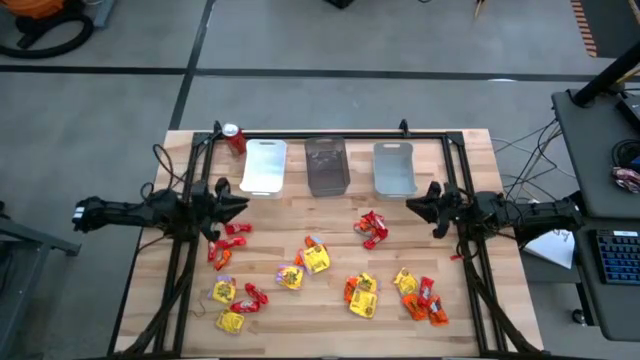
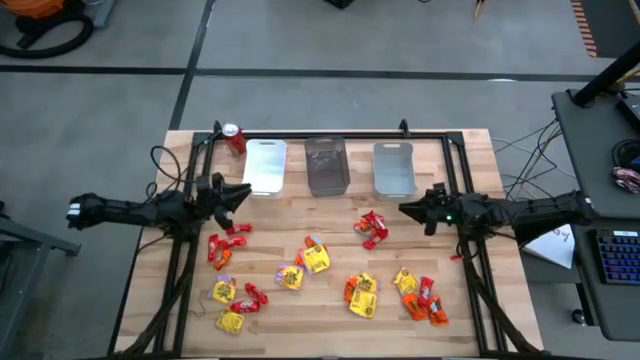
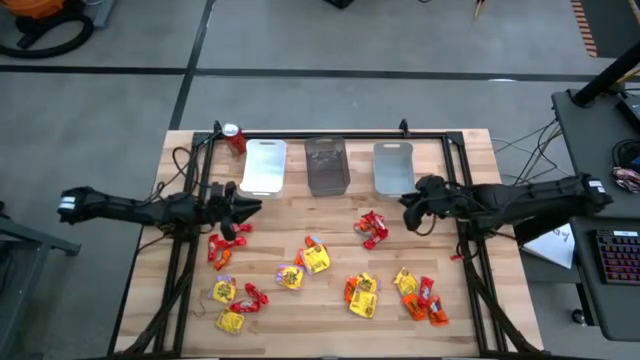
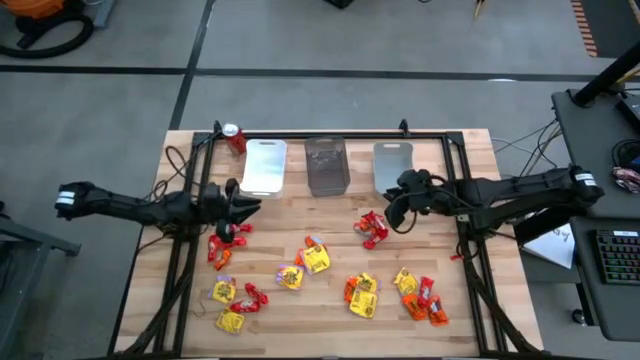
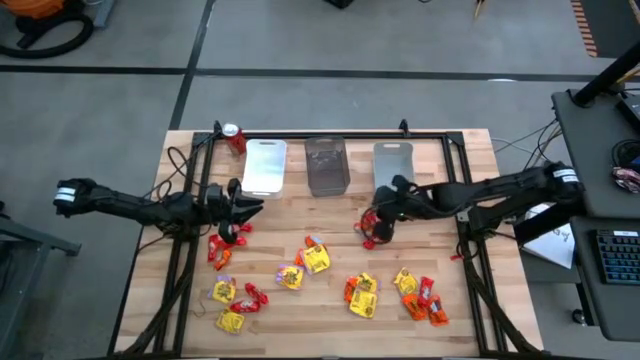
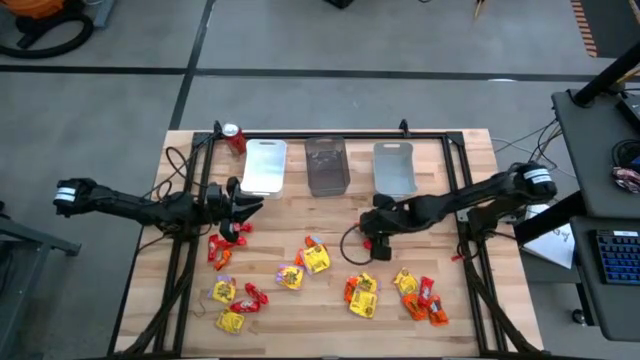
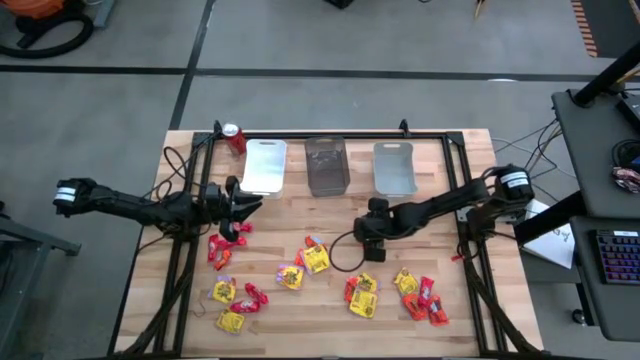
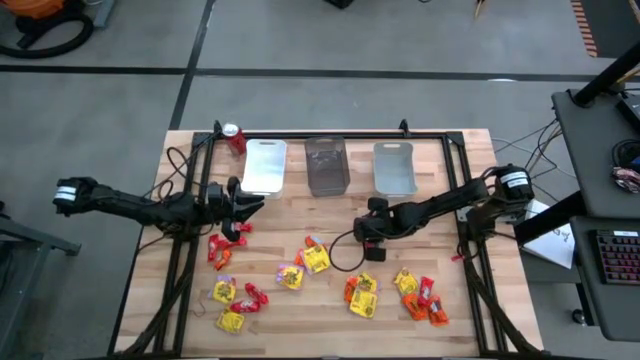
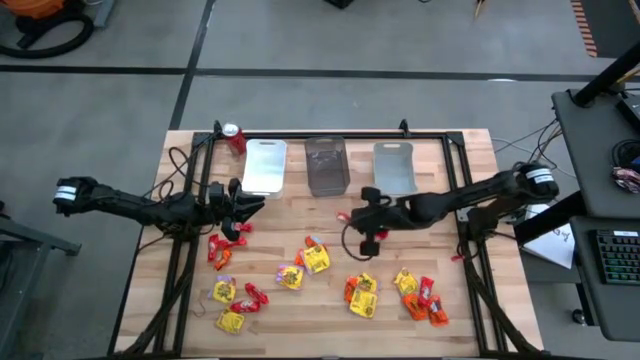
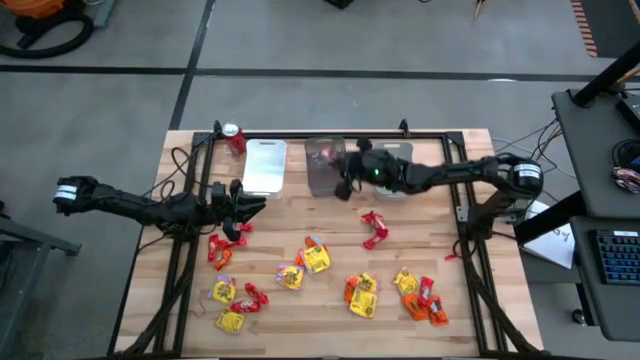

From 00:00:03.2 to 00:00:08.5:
Task: Sort candy
Put the orange chocolate into the black bin

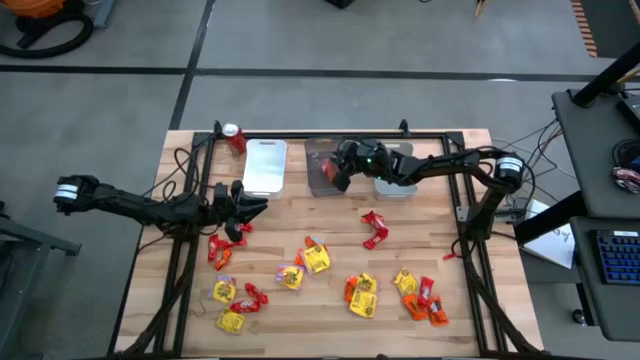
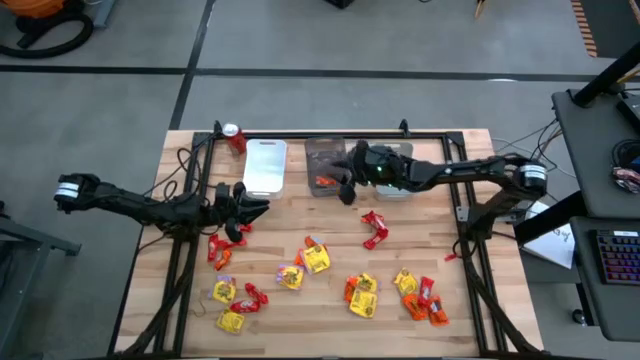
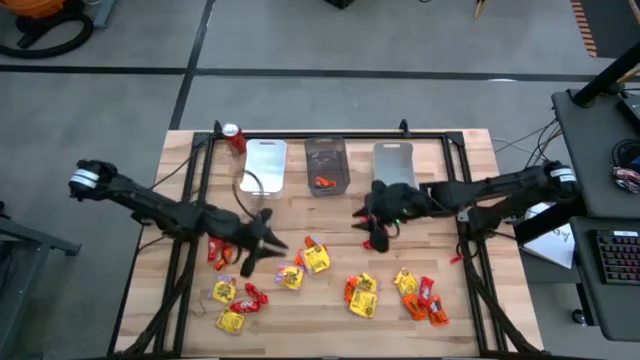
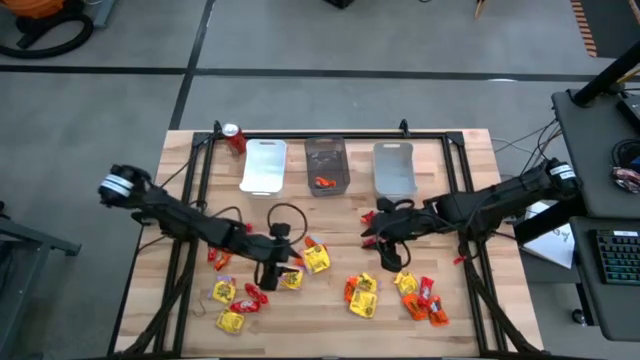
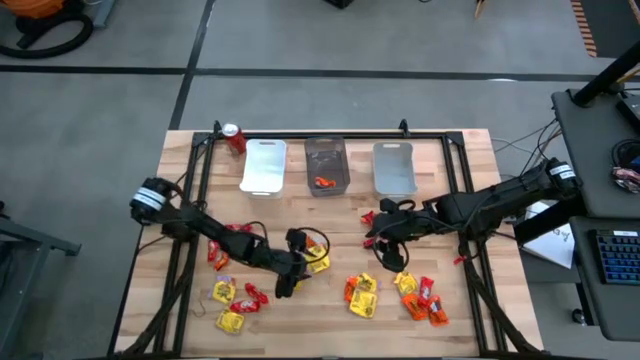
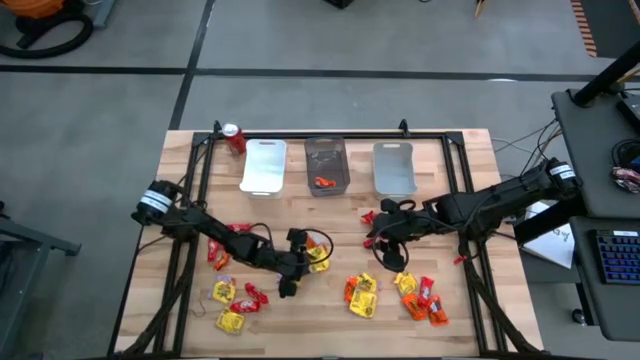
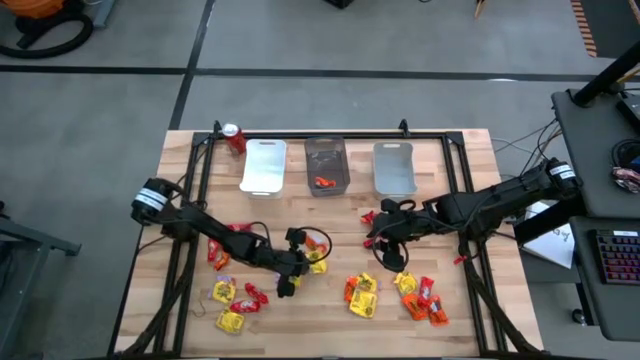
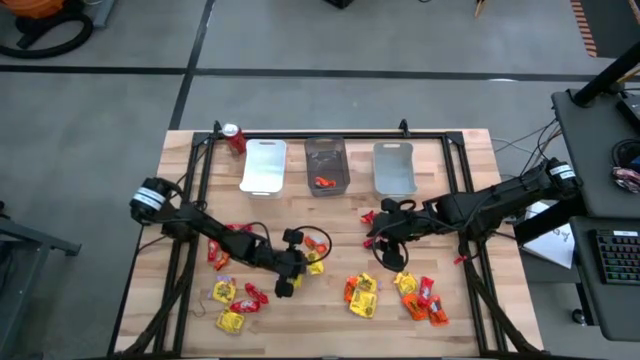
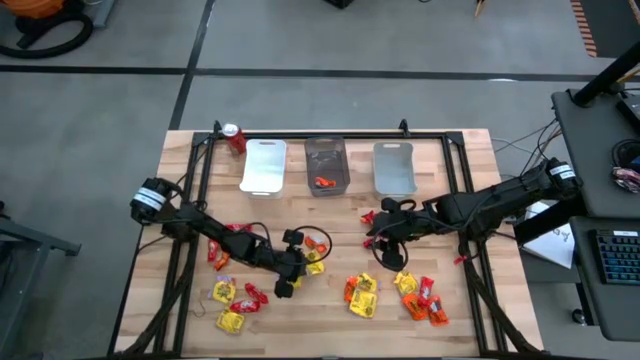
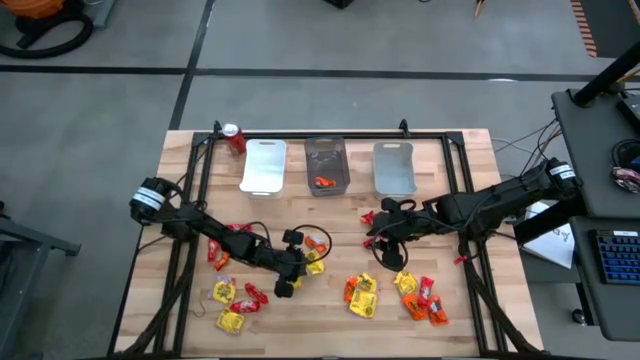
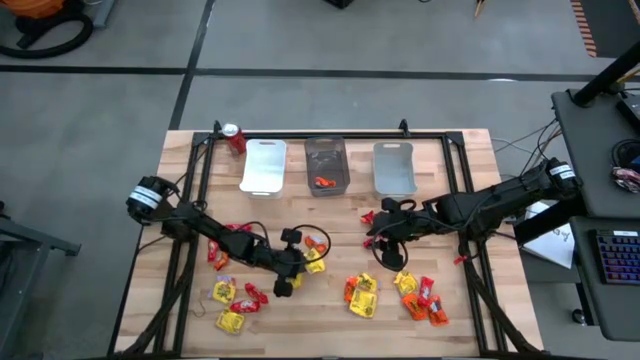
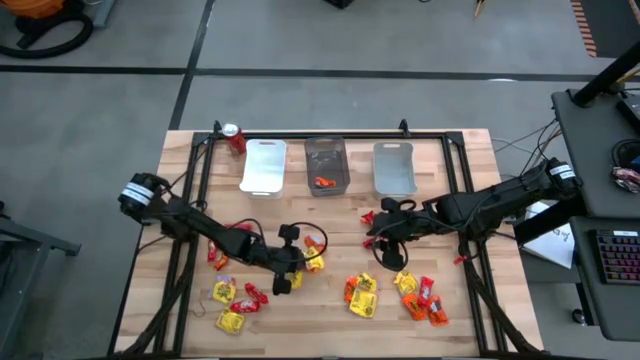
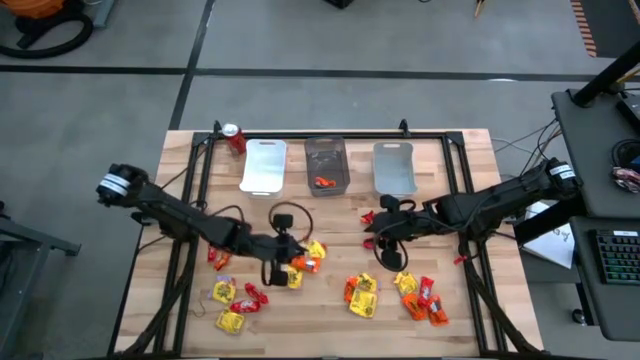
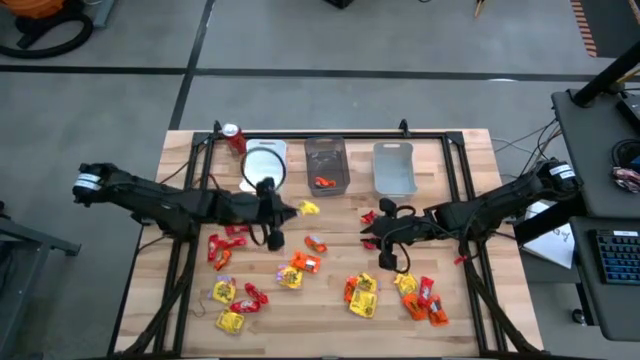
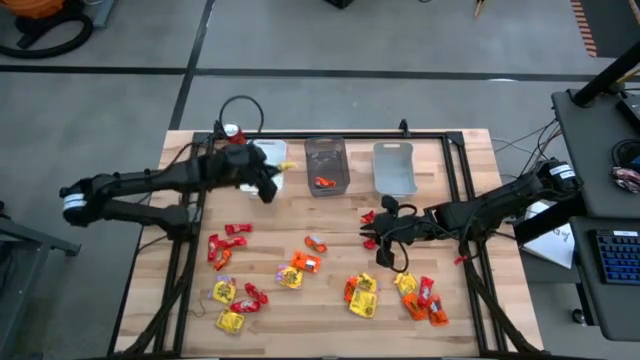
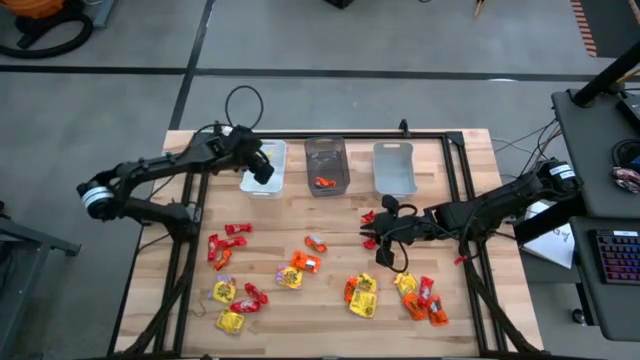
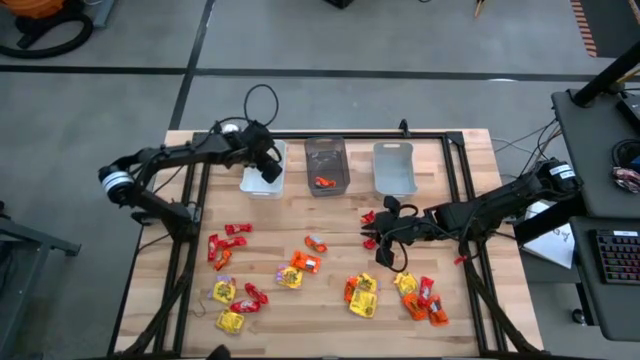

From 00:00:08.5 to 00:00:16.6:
Put the yellow candy into the white bin

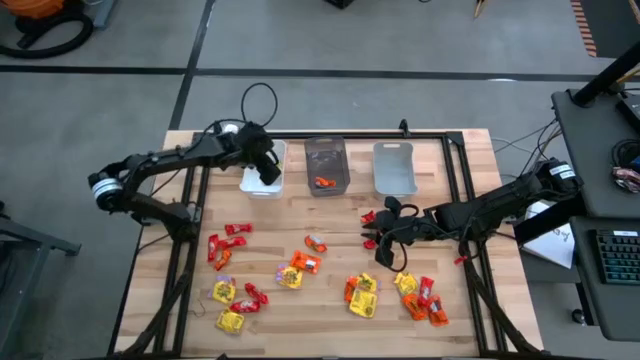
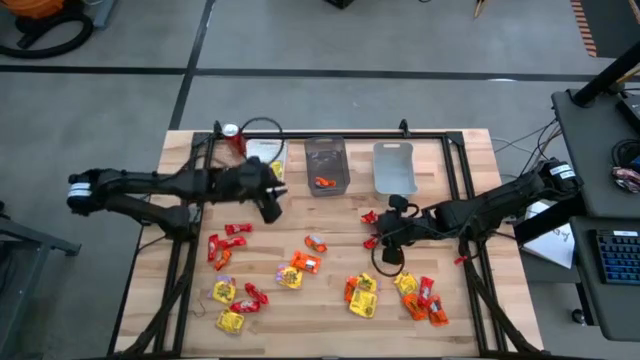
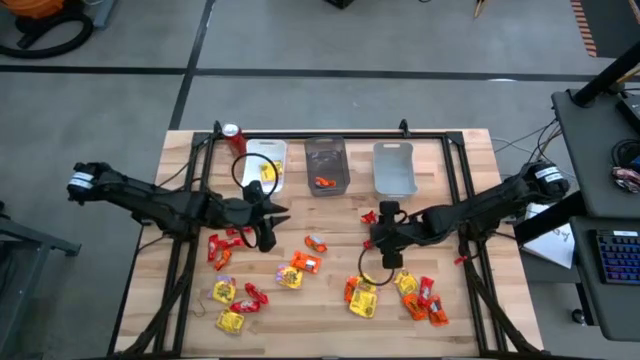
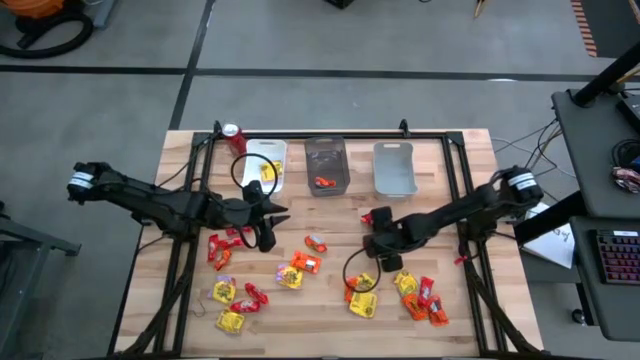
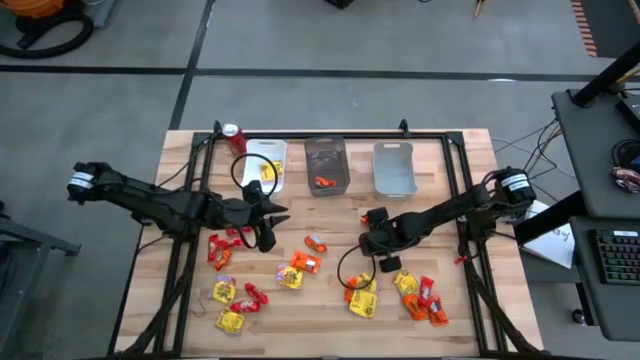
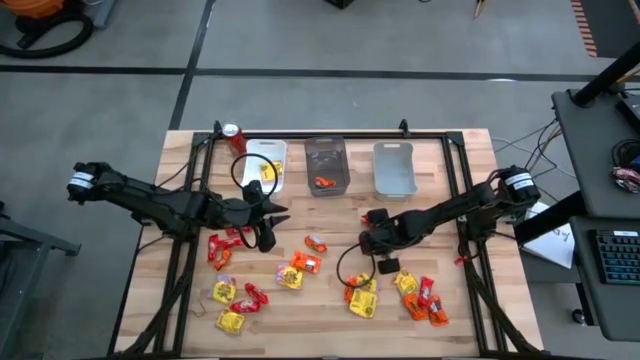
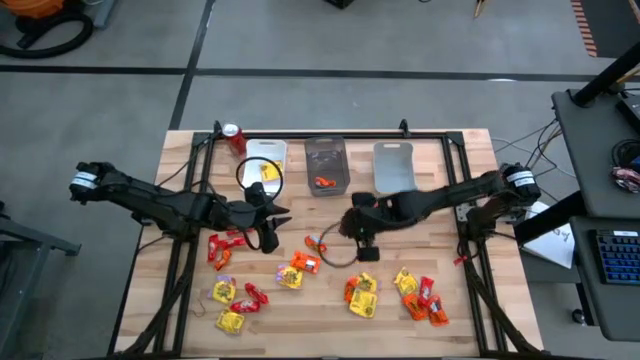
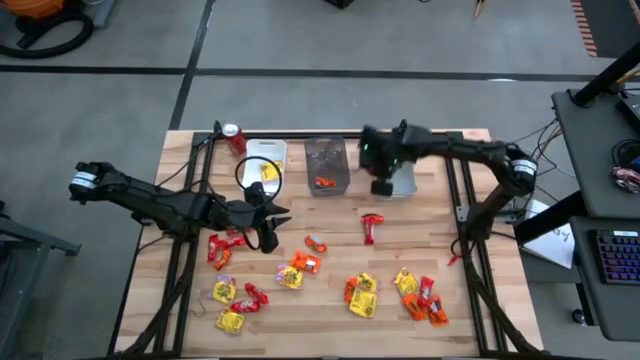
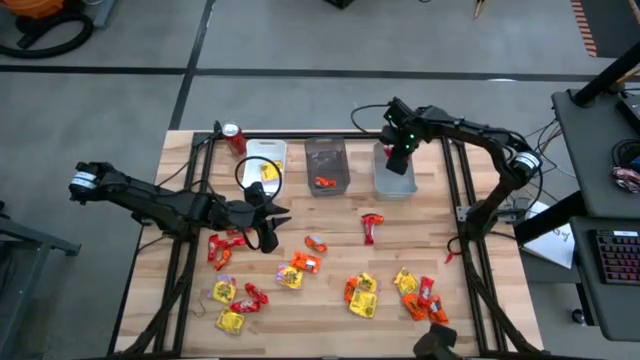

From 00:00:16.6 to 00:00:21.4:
Put the red chocolate into the gray bin

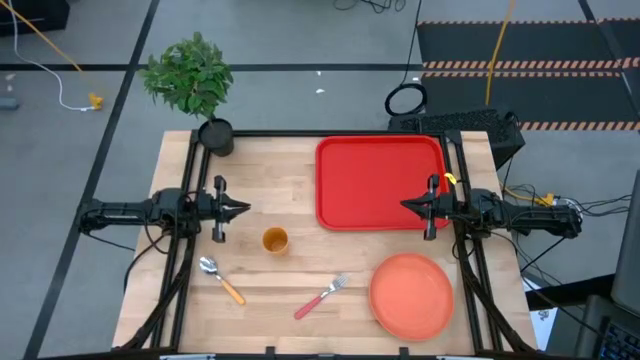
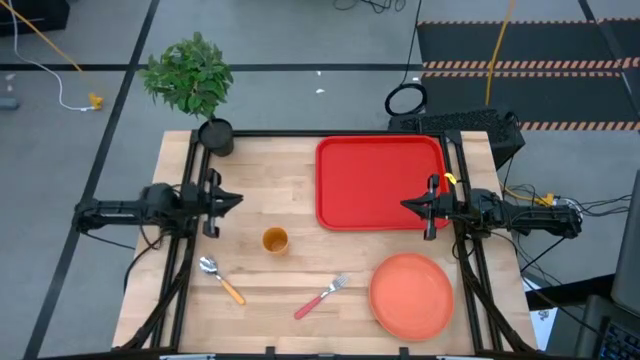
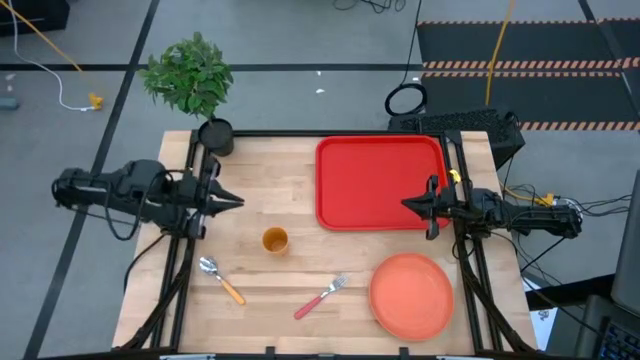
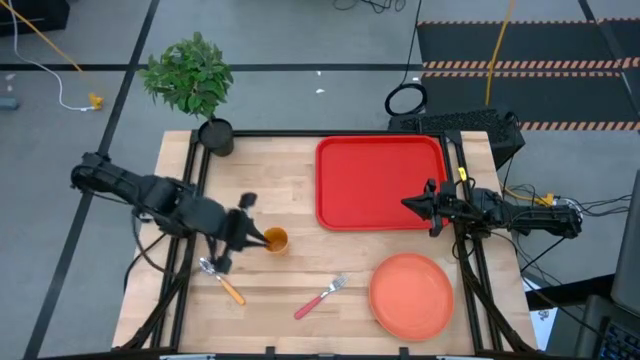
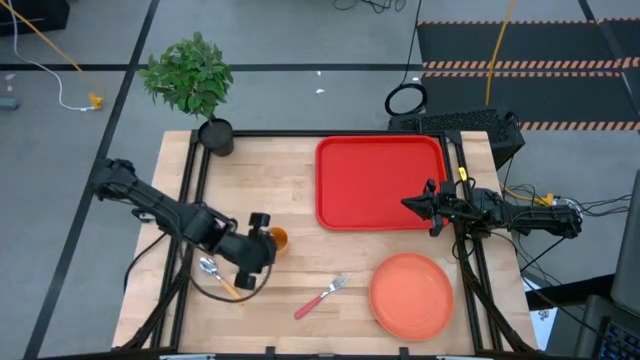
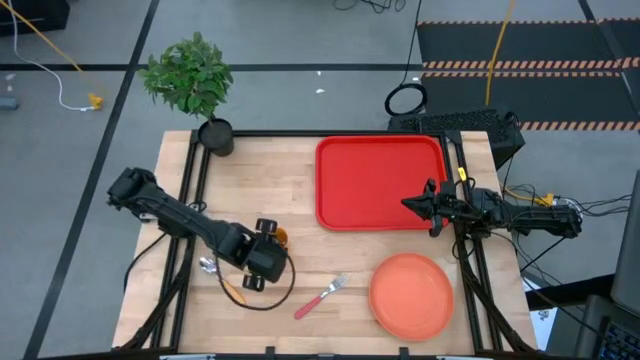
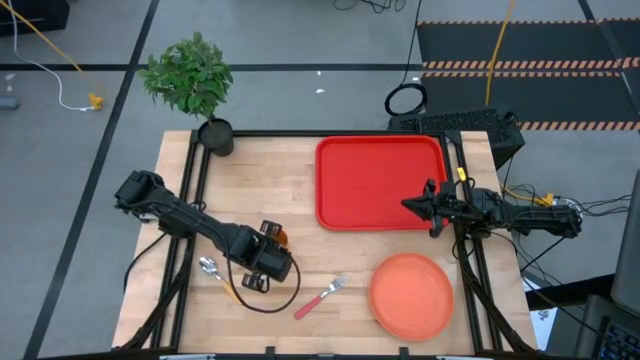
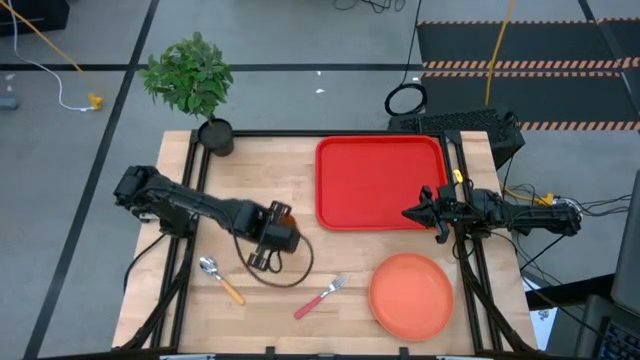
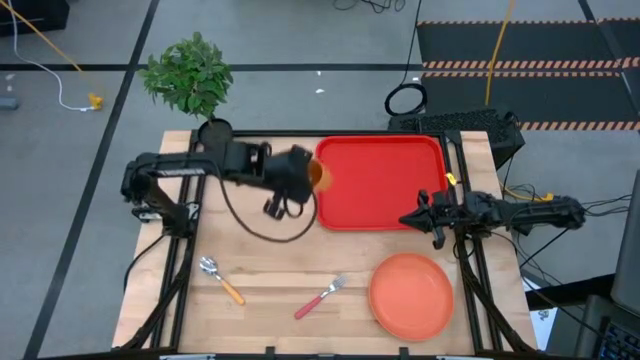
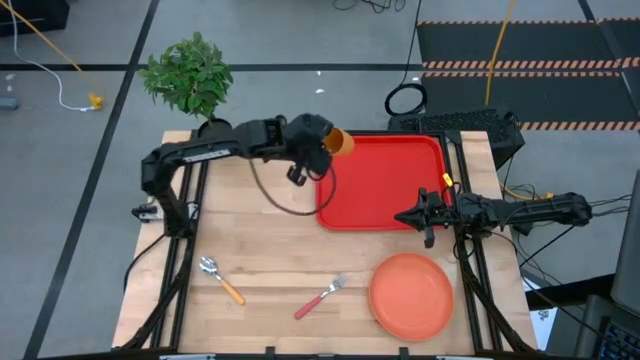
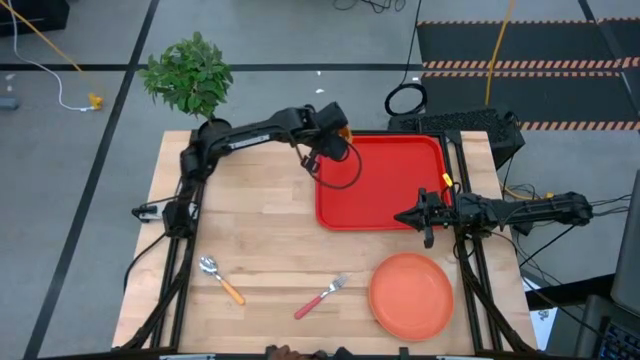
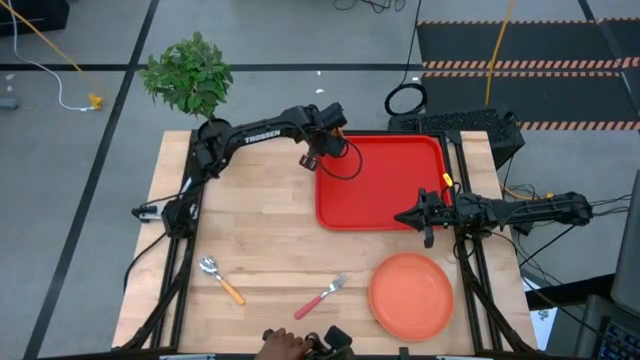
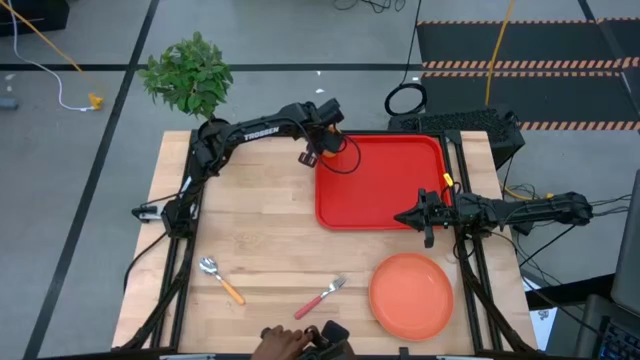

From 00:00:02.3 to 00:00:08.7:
Task: Pick and place plate/cup/fork/spoon on tray
Put the yellow cup on the red tray
